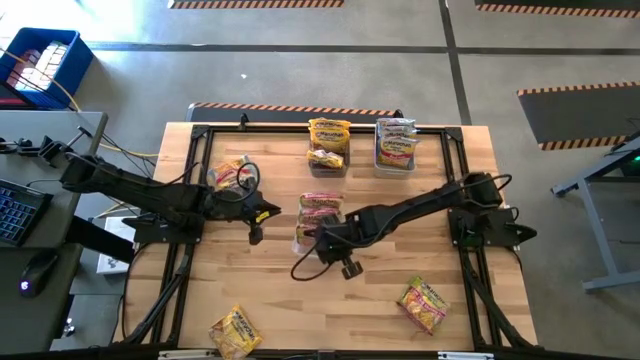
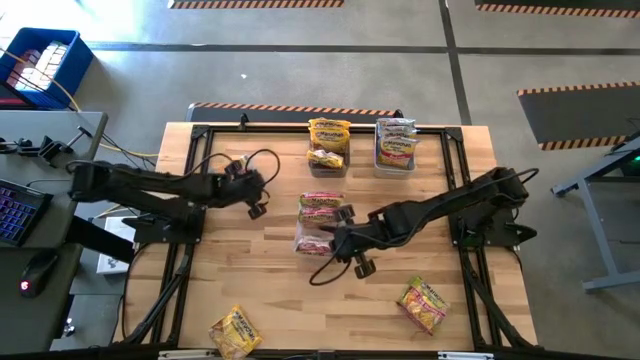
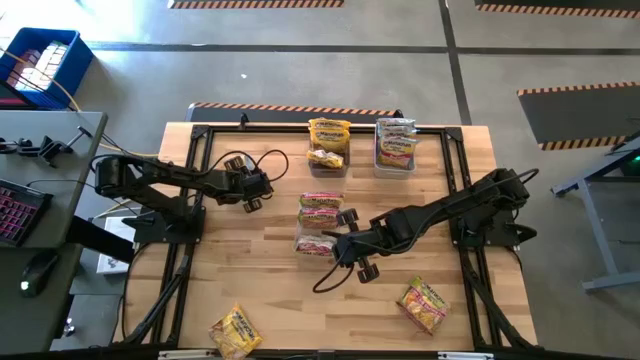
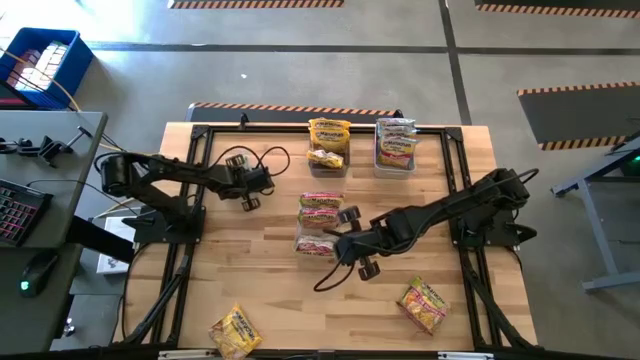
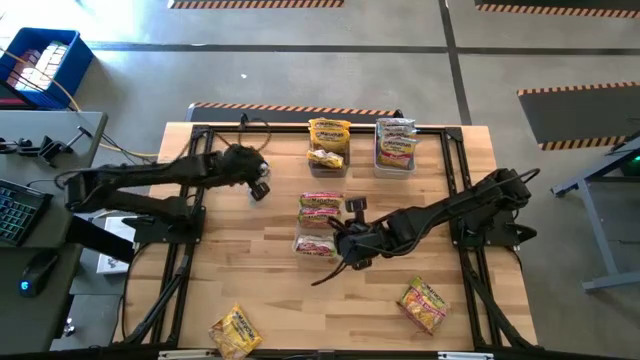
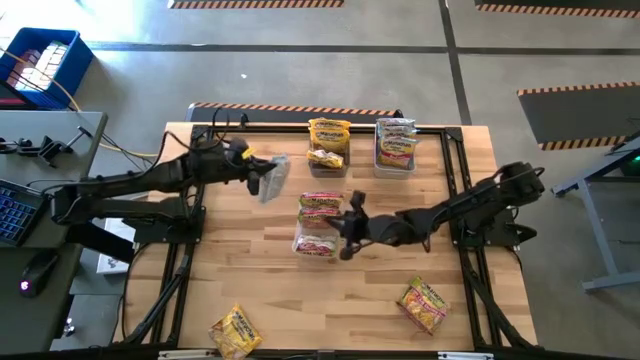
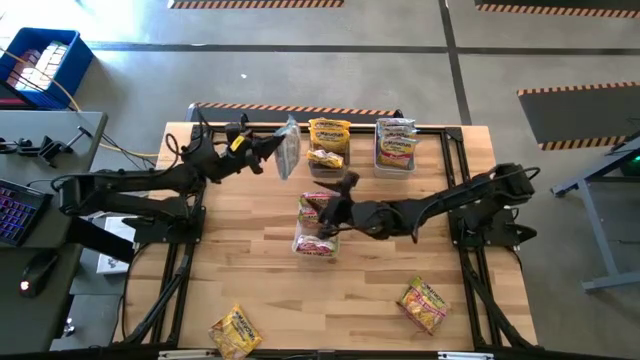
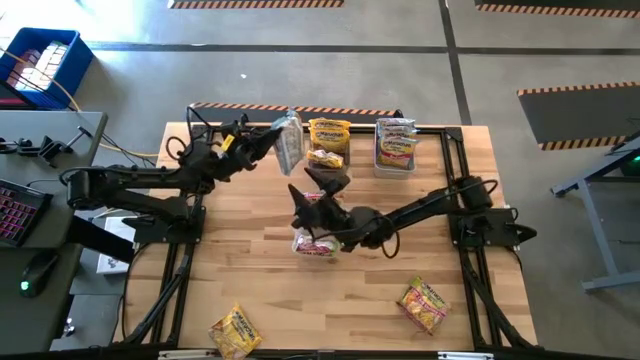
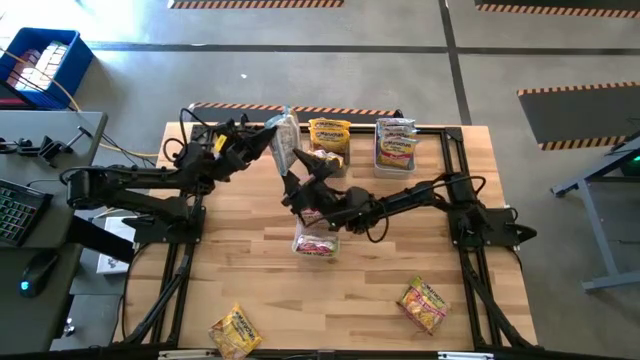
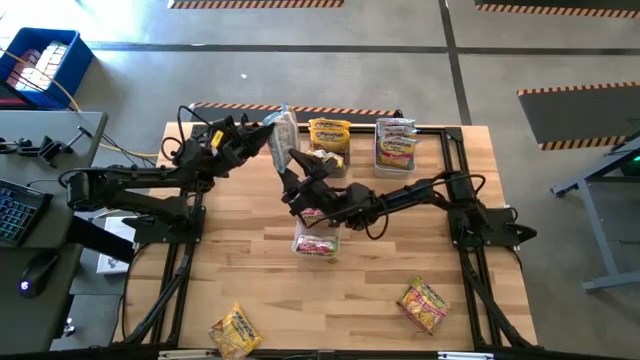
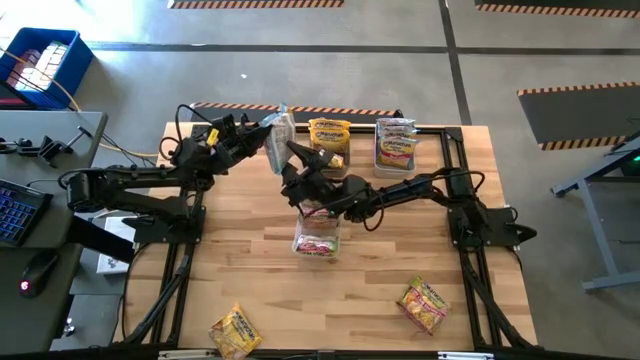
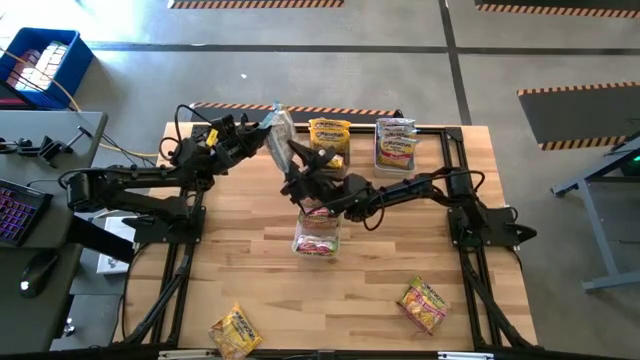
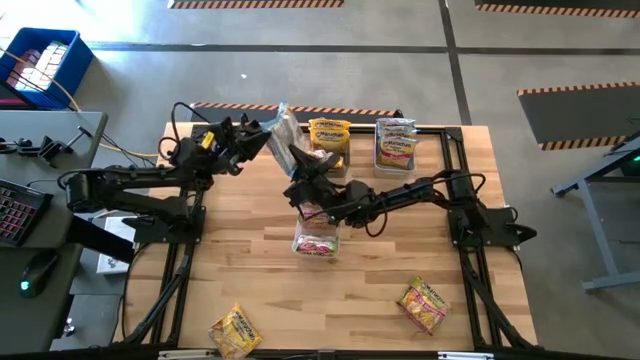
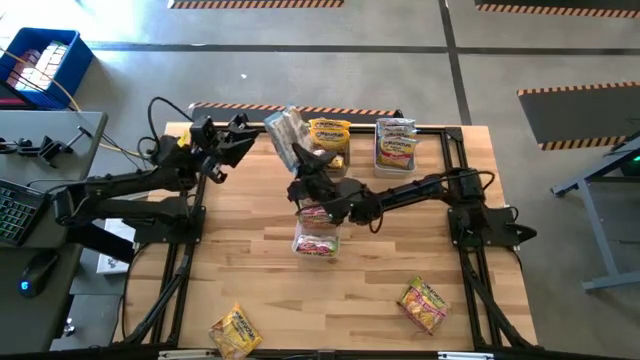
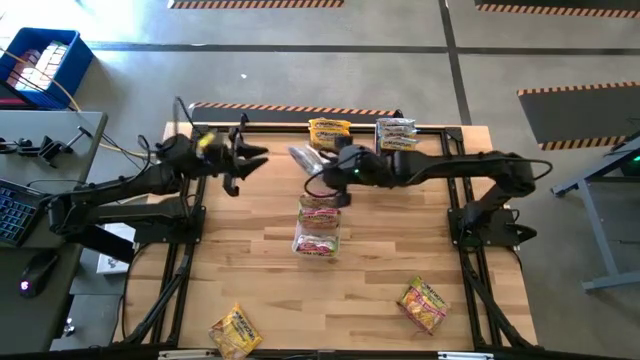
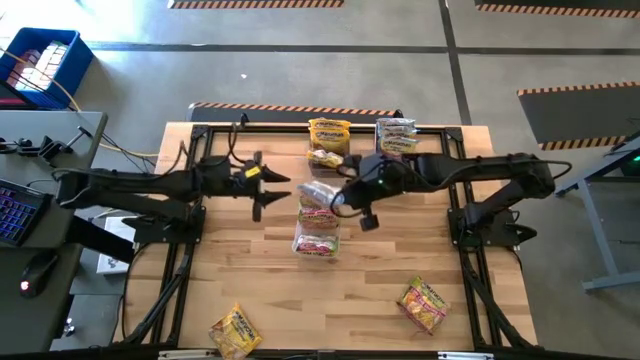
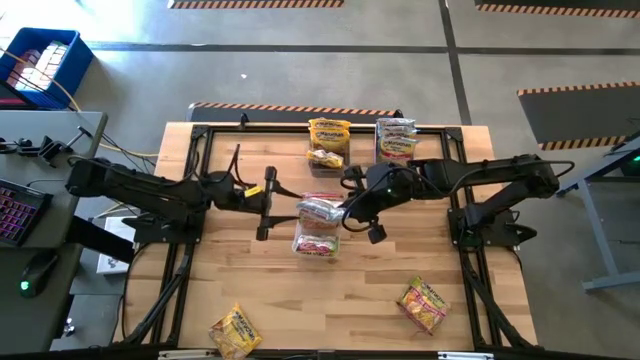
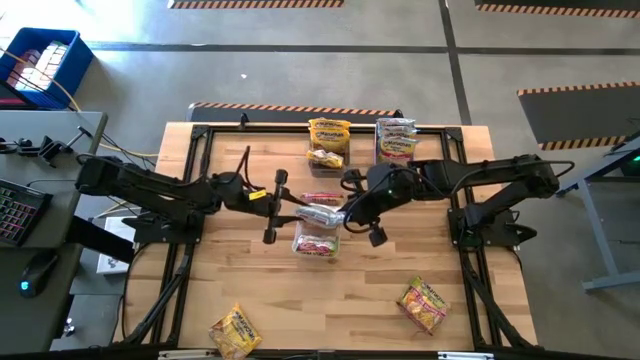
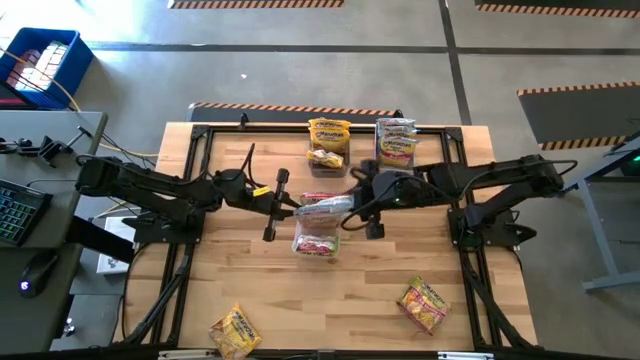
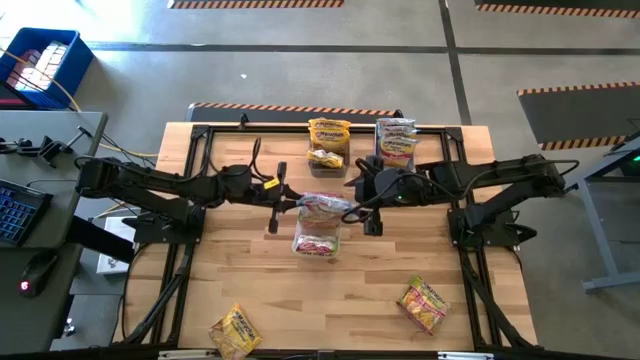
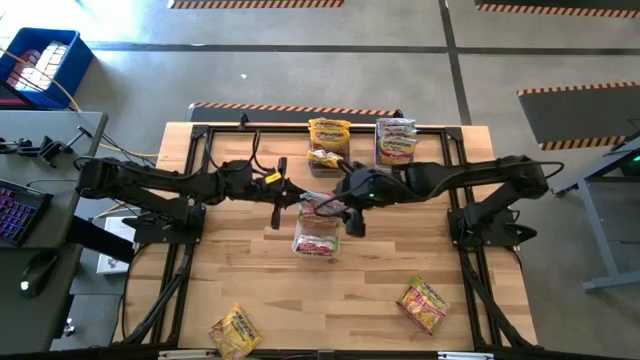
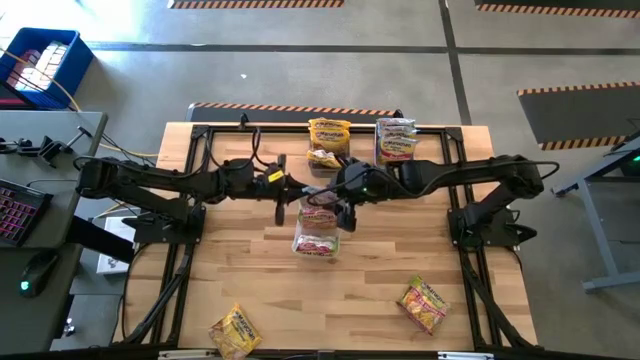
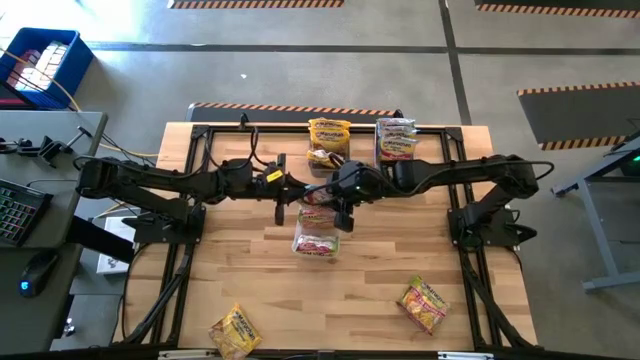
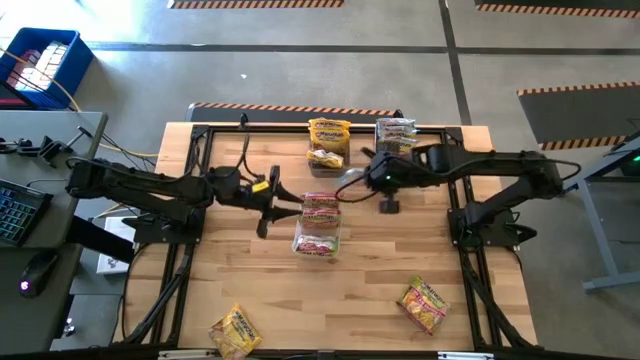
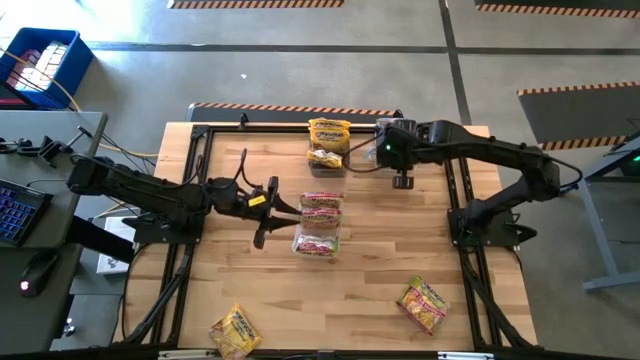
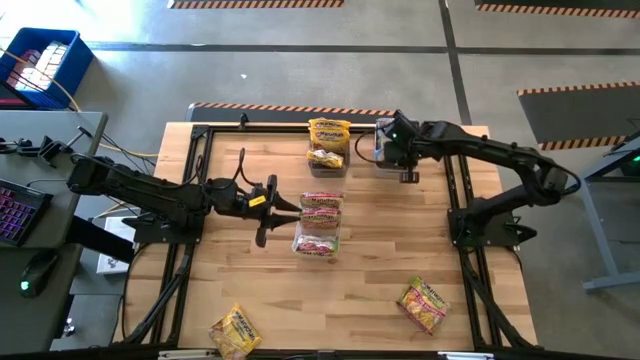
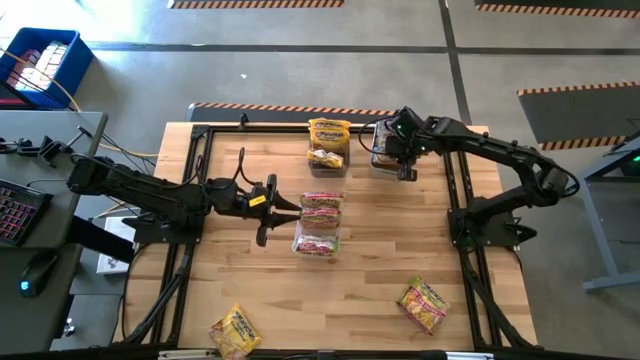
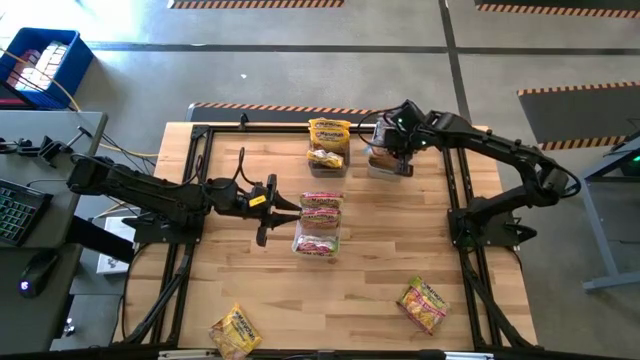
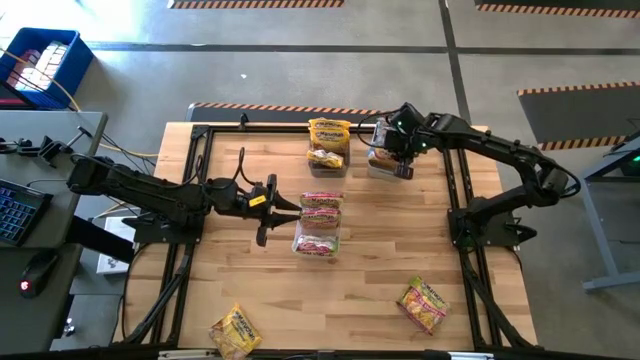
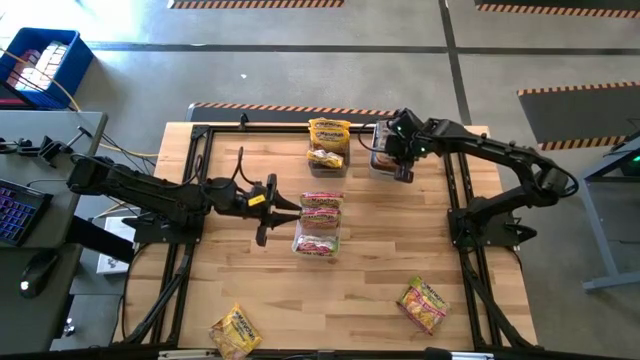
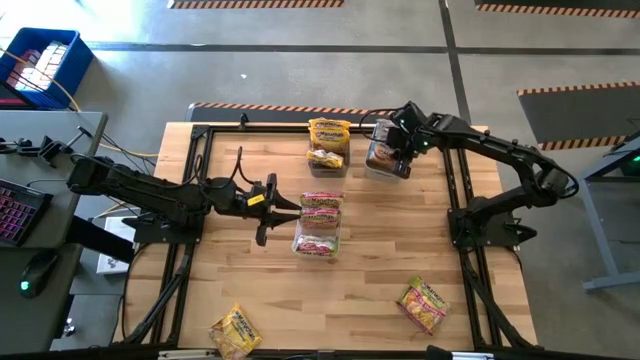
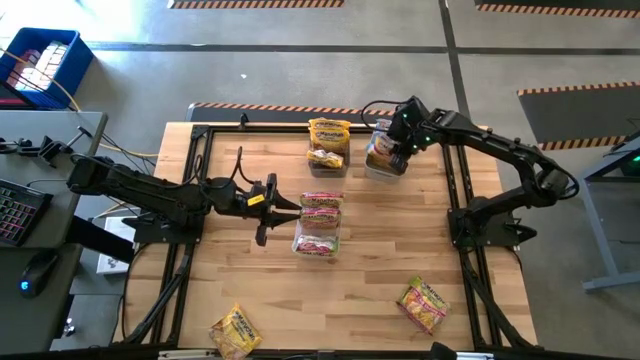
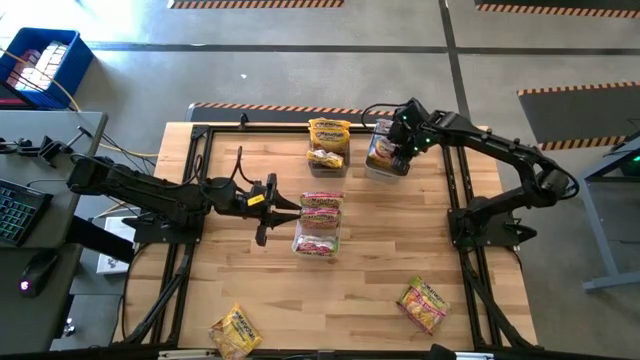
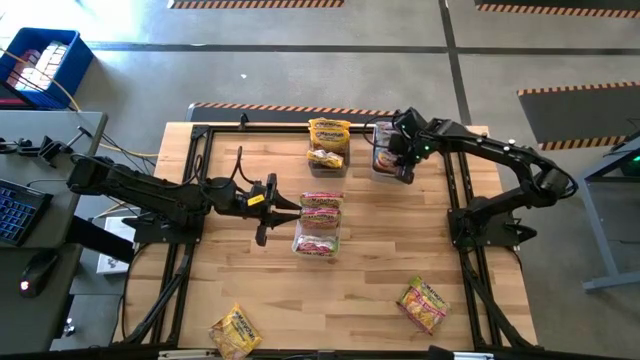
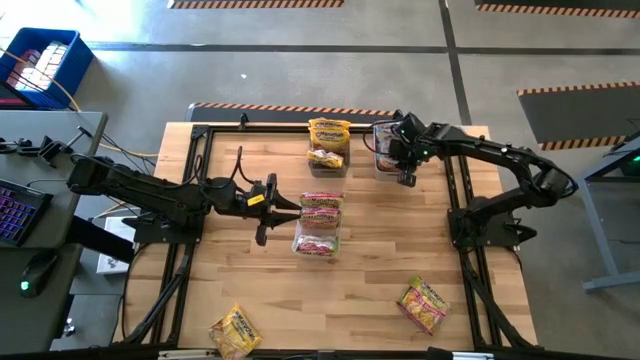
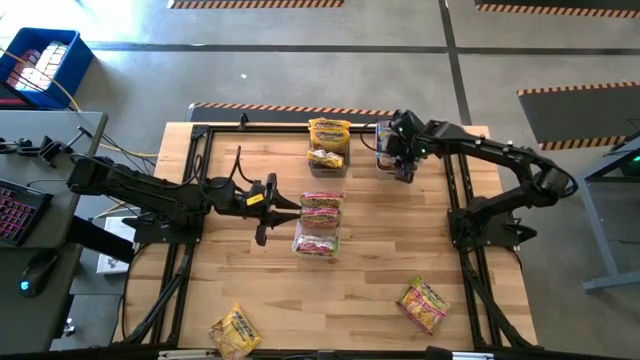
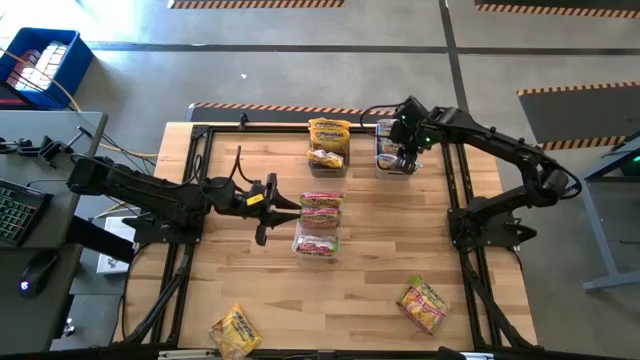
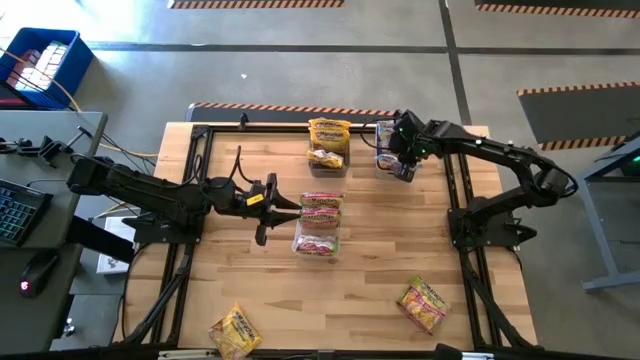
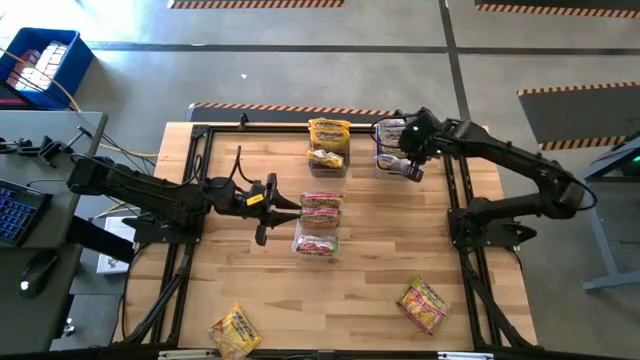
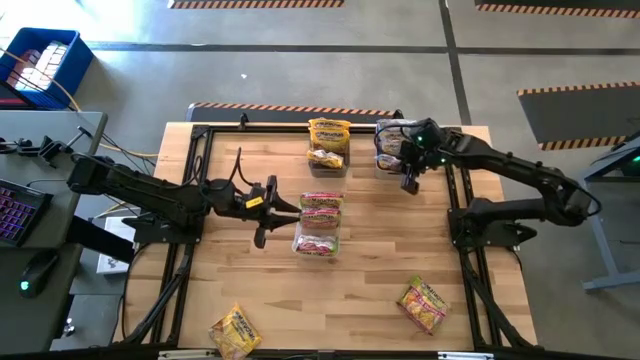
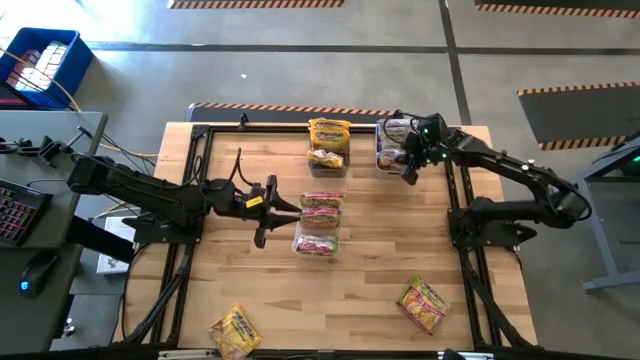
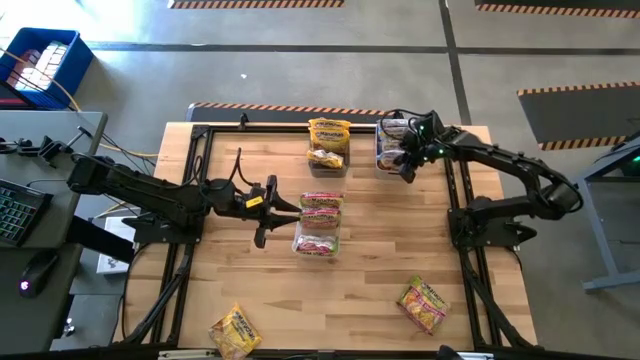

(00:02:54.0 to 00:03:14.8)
Task: Sort Maruchan noodles
Put the blue noodle pack into the white bin

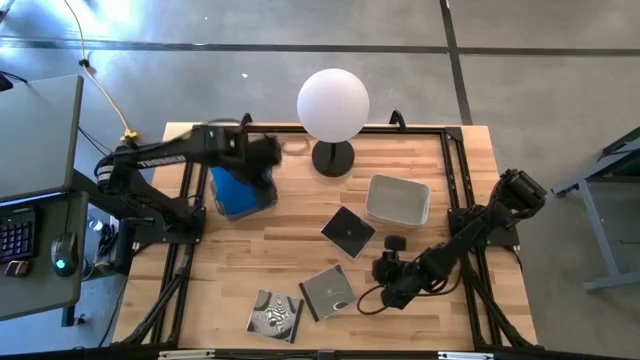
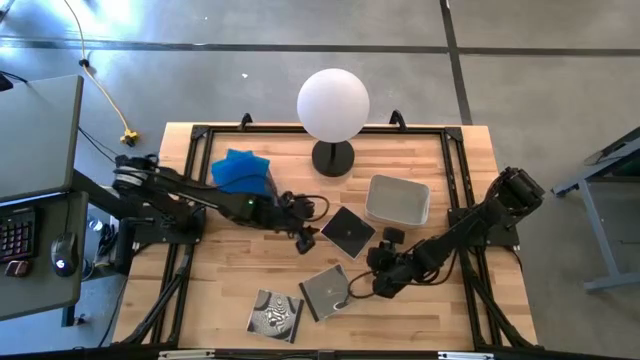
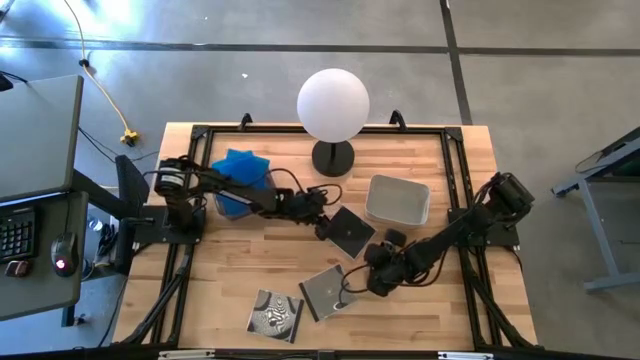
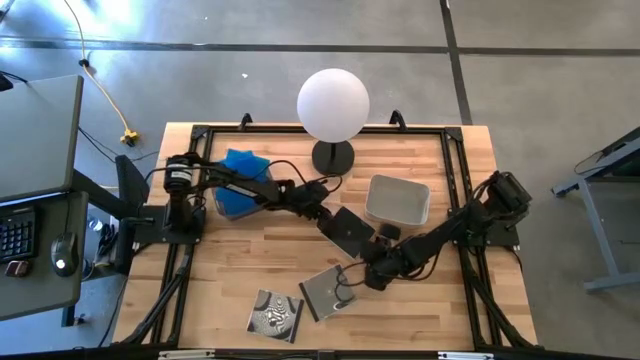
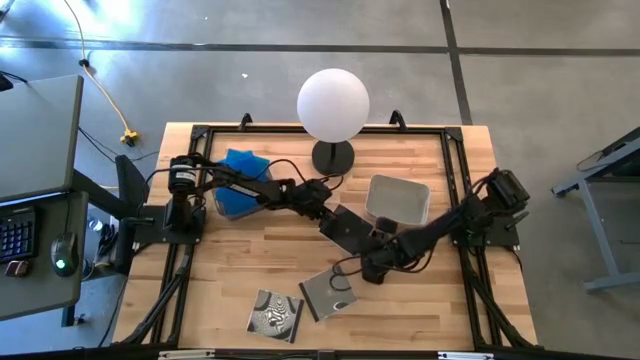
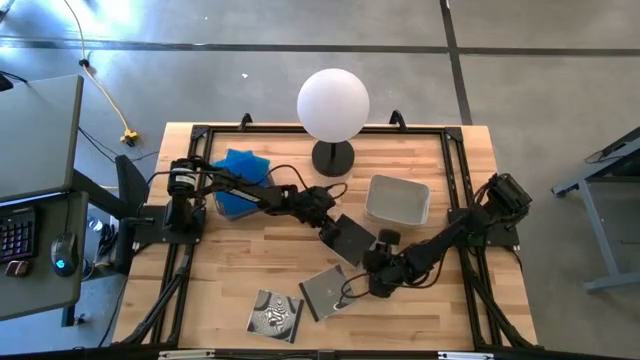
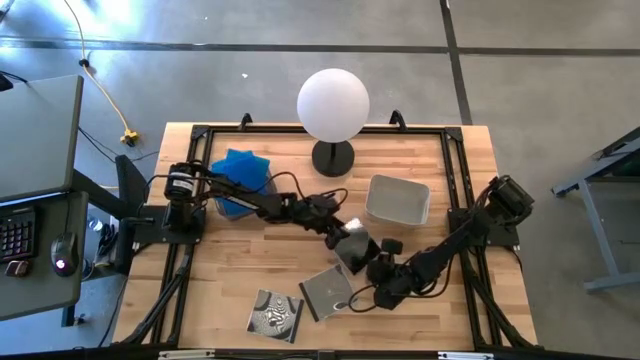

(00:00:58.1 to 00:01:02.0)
Task: Pick & place jewel cases by type
Put the top black cd case into the gray bin
